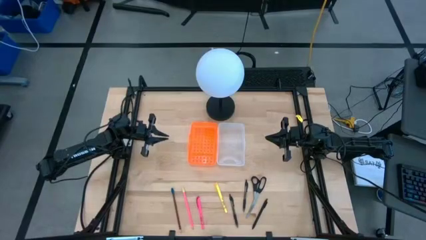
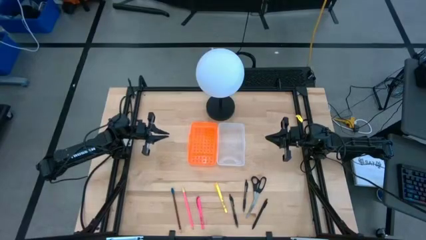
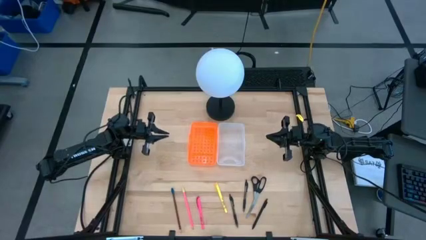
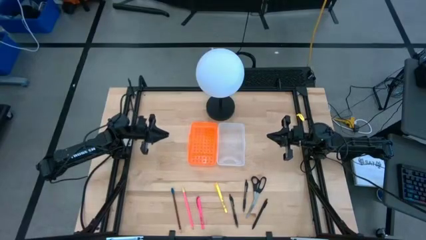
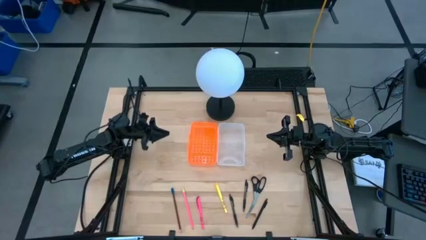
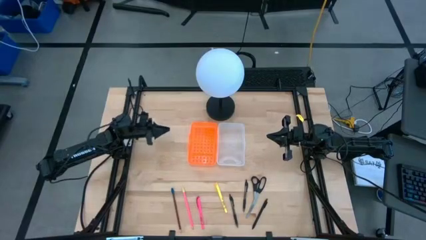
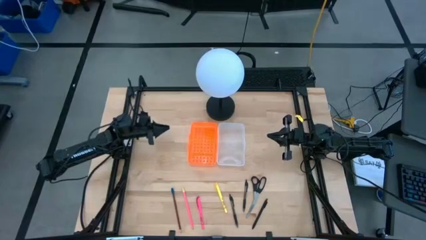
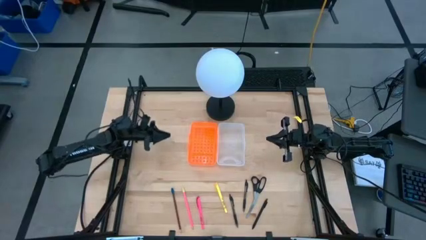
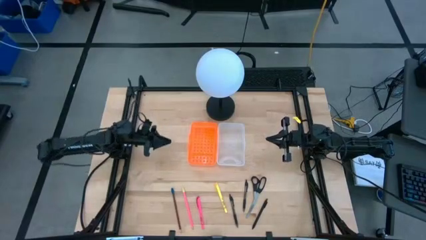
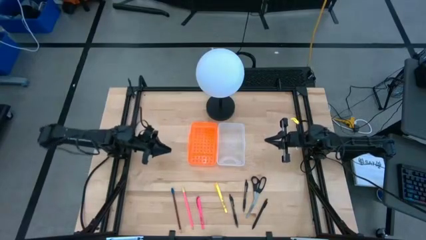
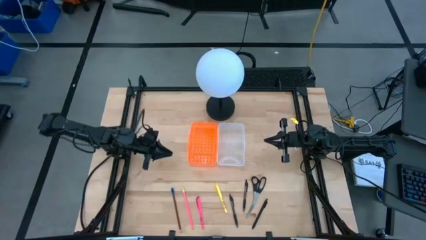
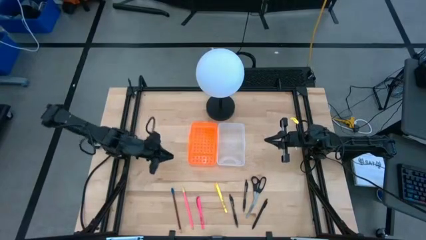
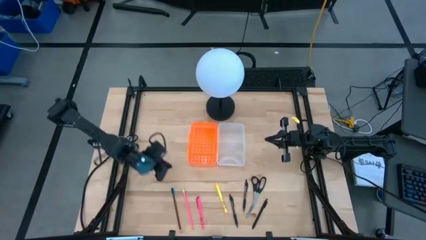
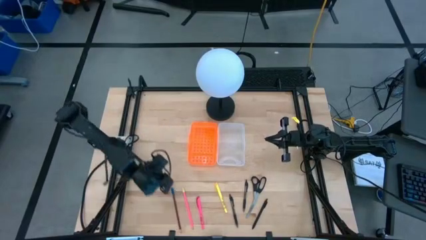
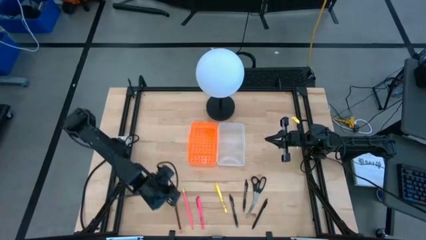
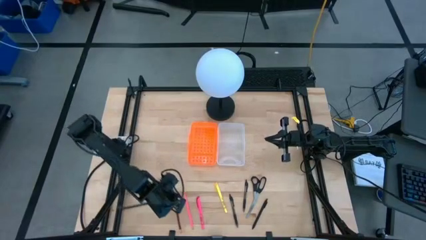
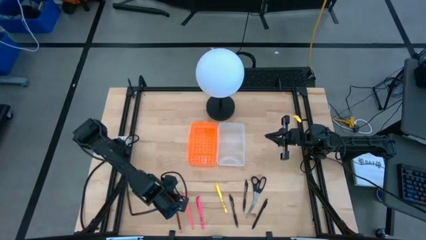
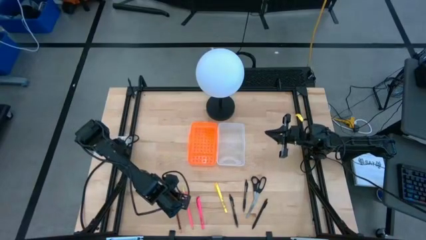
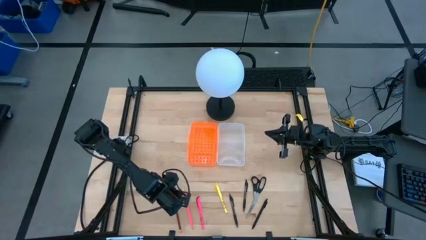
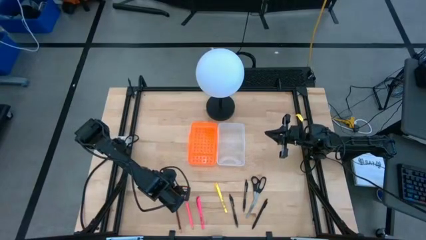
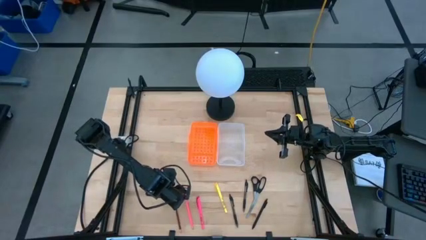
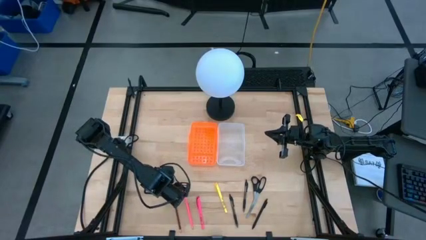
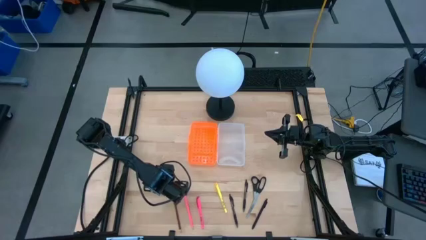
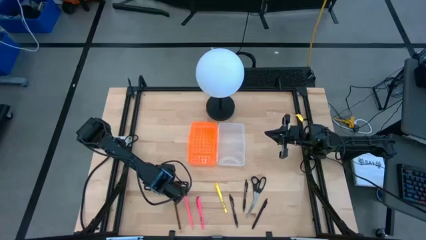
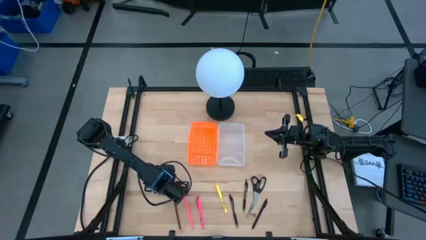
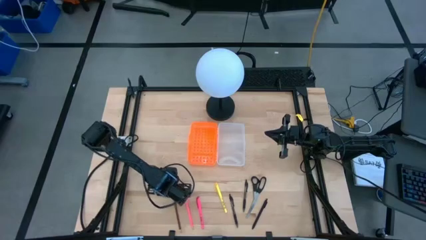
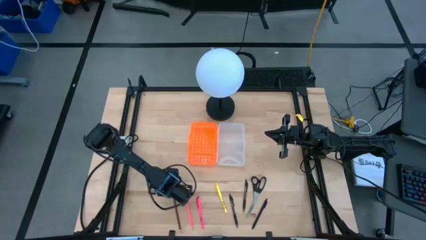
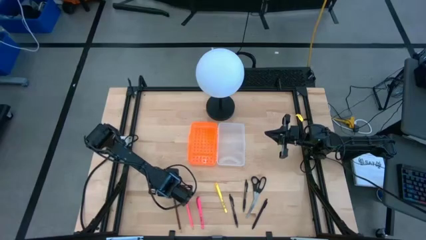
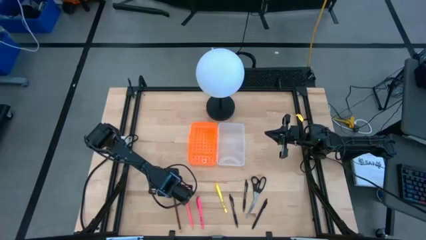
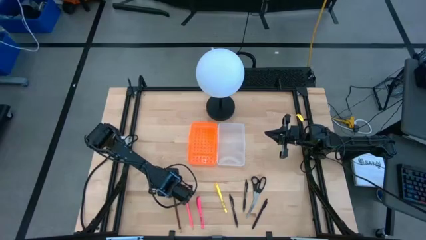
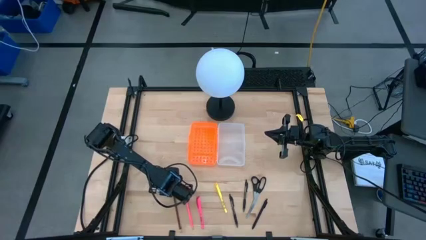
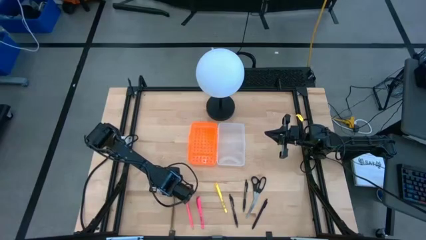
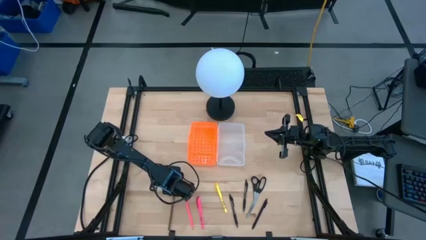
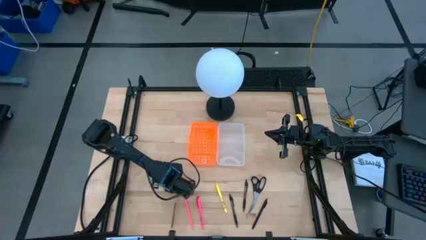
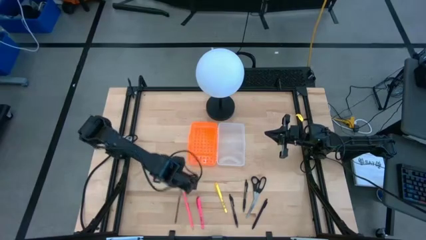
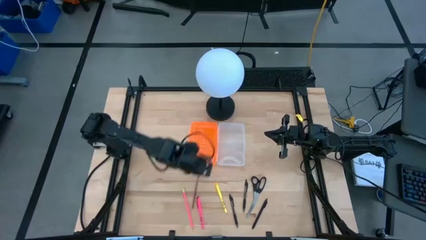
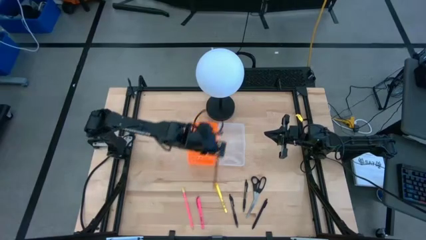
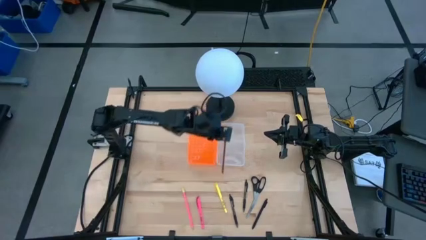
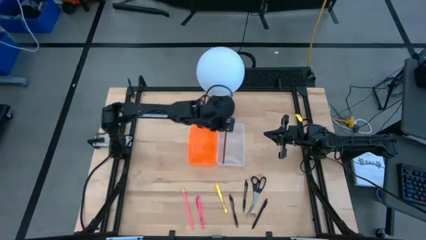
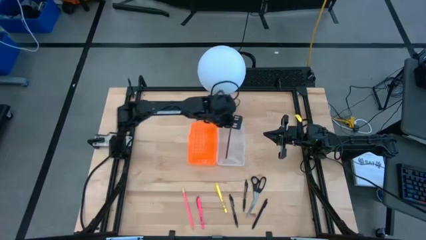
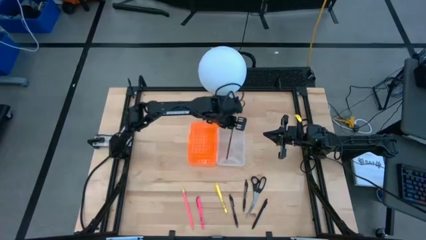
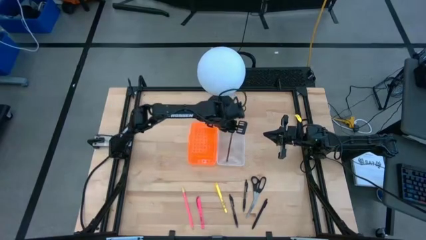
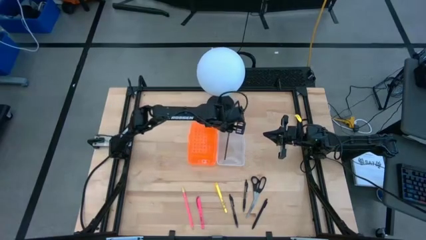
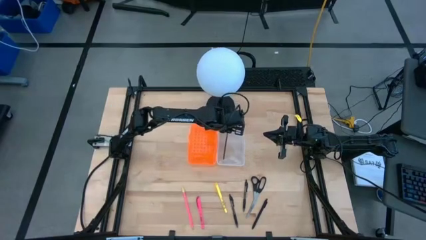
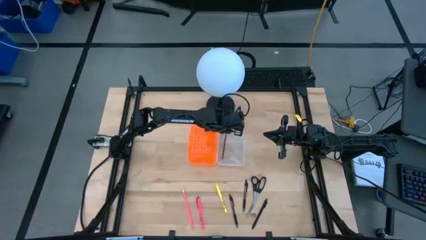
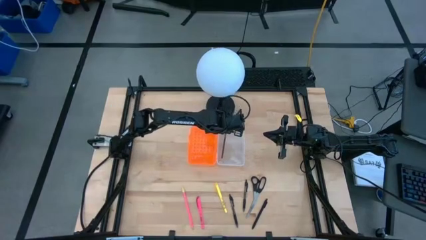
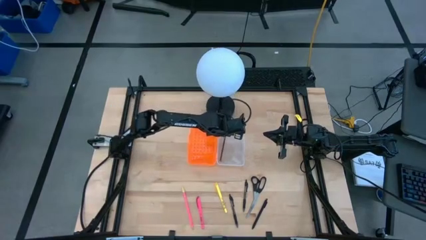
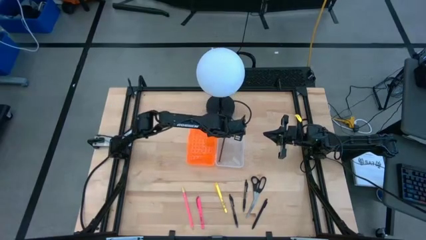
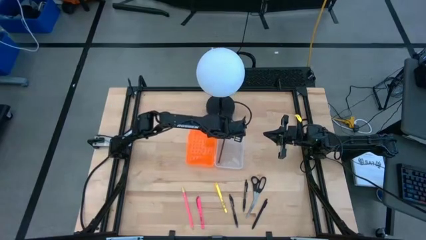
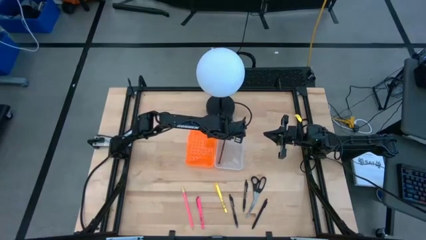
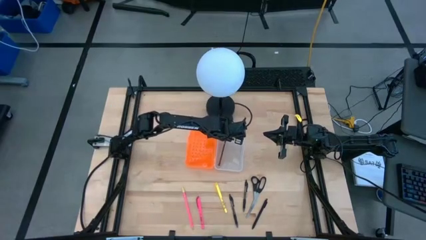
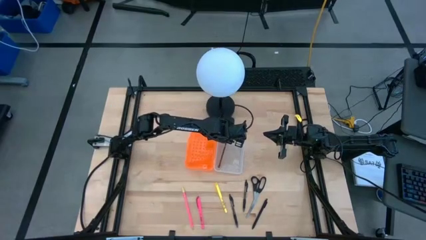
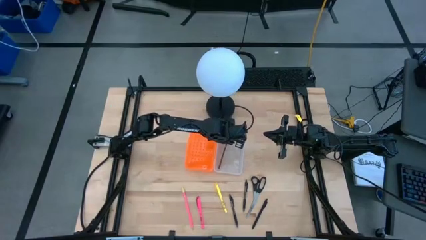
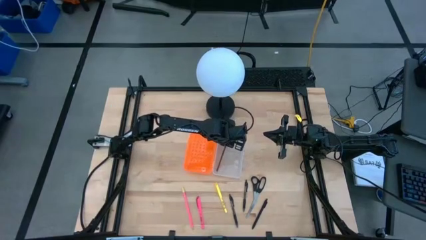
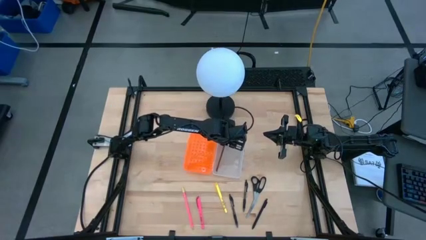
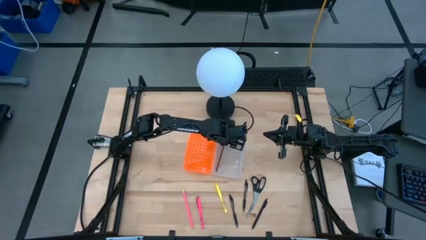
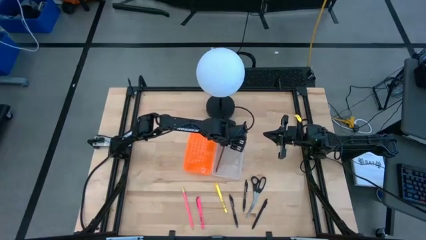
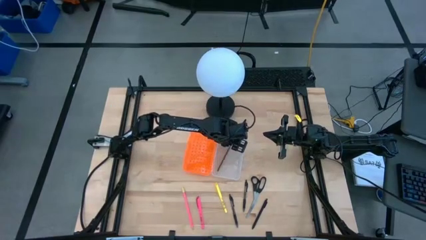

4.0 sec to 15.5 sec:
Task: Pick & place school supplies into a supply box
Put the brown pencil into the pencil box
